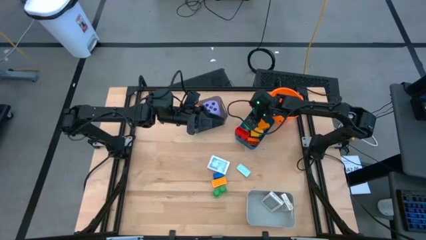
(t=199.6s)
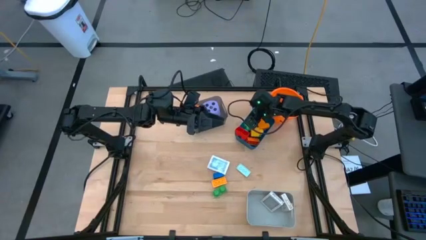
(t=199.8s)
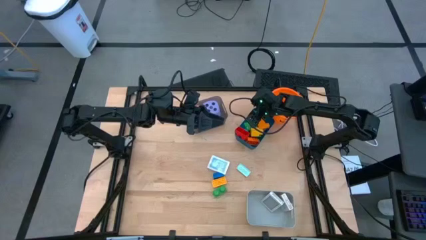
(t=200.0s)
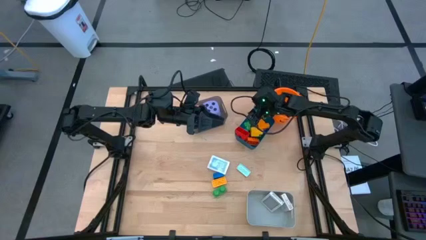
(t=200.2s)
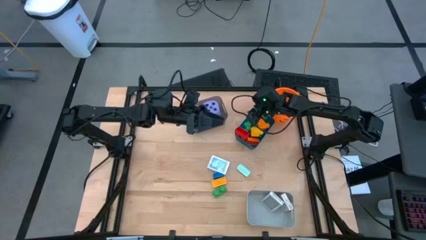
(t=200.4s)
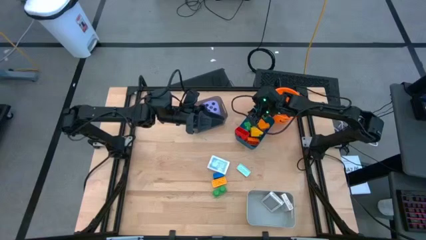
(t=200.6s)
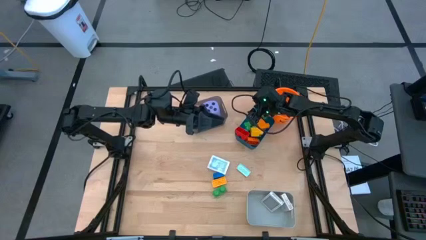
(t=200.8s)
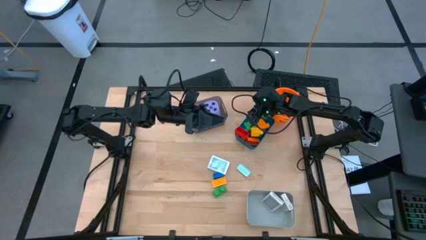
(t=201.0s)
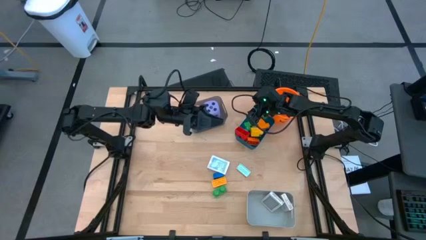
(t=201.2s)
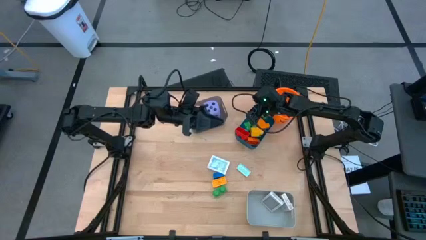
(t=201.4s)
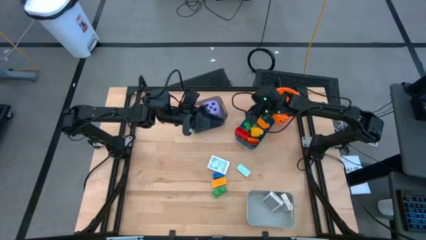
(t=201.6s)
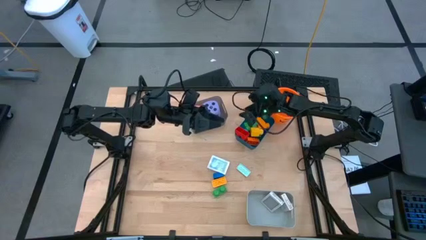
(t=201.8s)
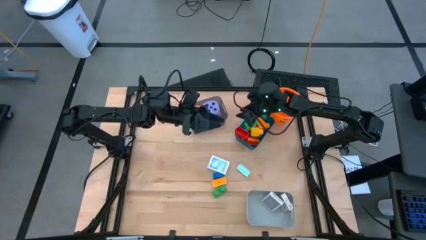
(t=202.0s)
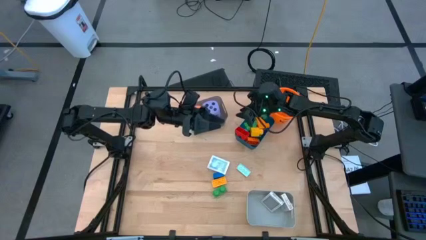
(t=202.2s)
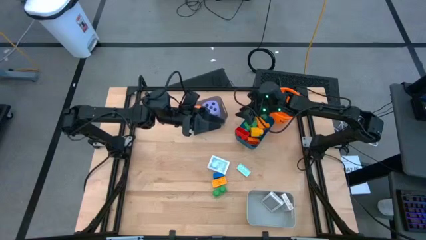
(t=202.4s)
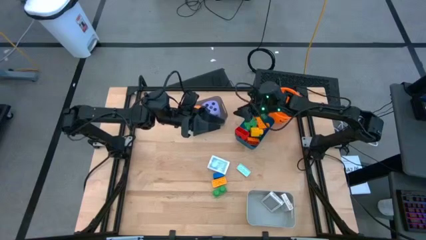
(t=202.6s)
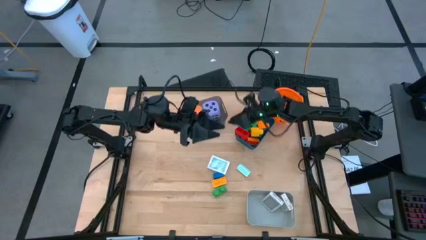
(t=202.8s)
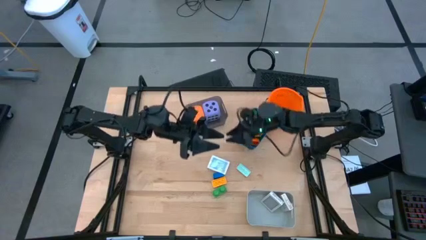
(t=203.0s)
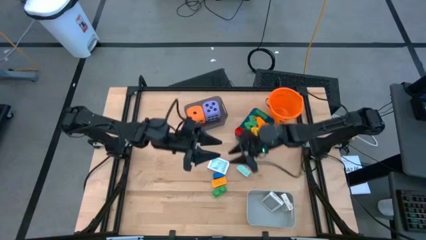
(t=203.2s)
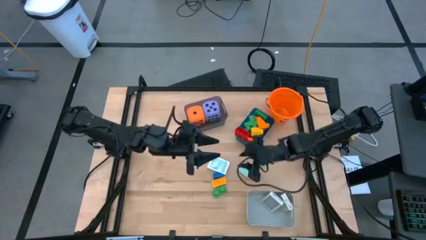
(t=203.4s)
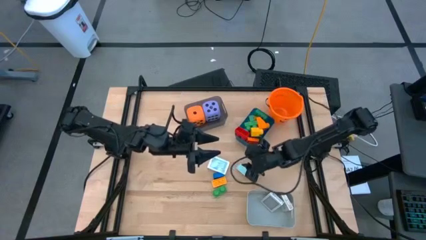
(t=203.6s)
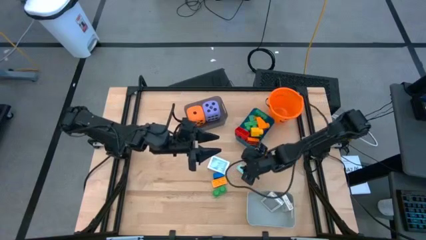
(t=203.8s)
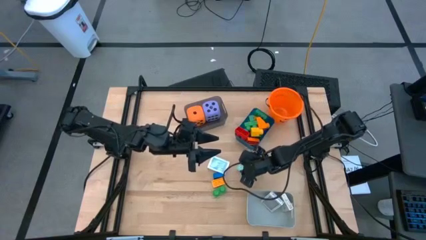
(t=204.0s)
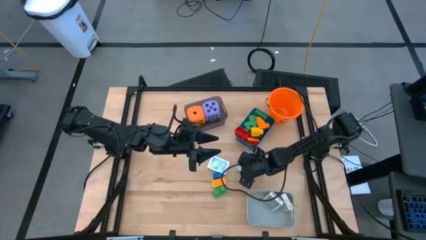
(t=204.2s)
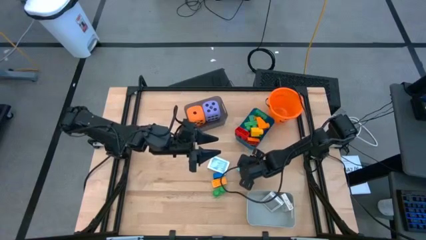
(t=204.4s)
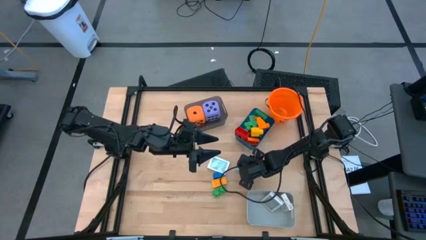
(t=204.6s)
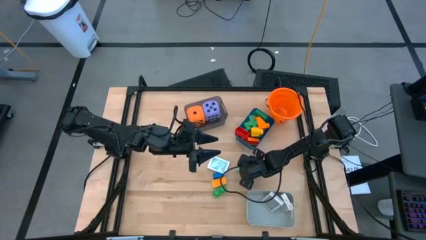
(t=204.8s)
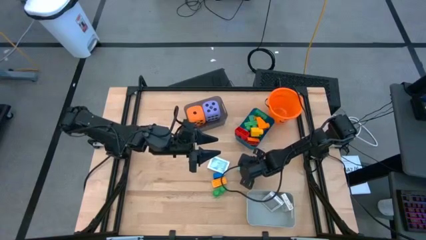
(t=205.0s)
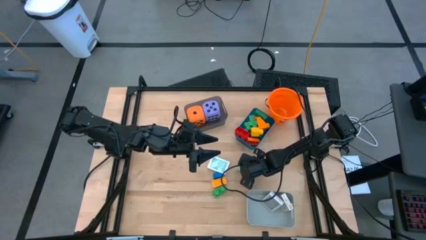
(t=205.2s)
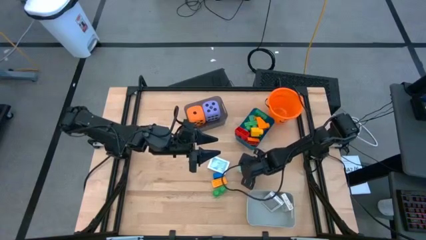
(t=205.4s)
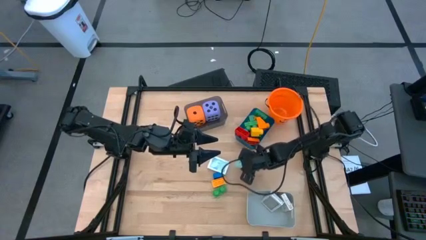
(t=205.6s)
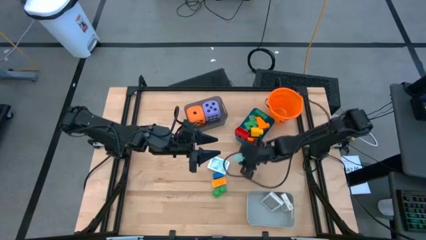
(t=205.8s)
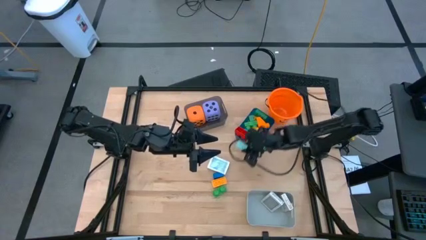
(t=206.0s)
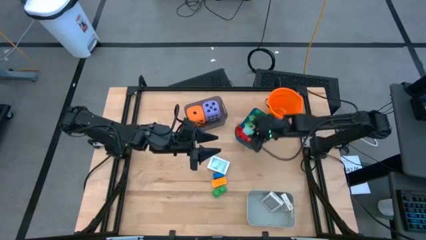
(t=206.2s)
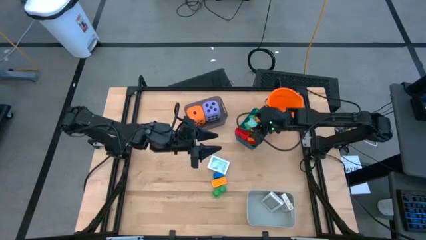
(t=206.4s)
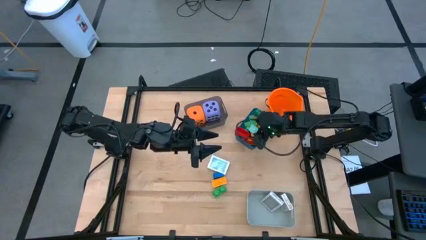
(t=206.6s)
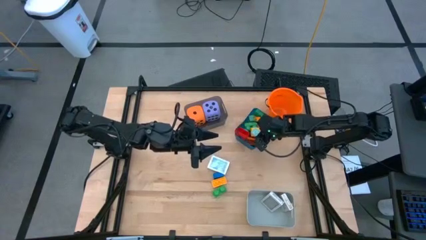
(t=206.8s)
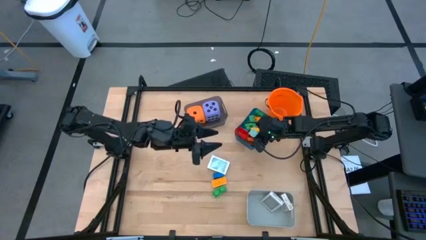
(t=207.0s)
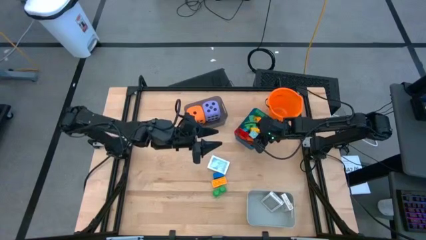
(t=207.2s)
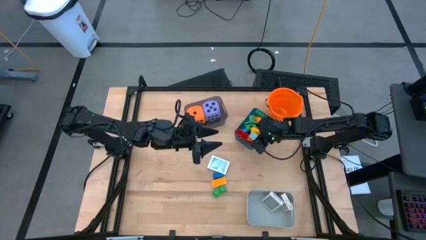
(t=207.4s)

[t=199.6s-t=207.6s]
Task: Pick & Place Toys
Put the white game piece into the blue bin

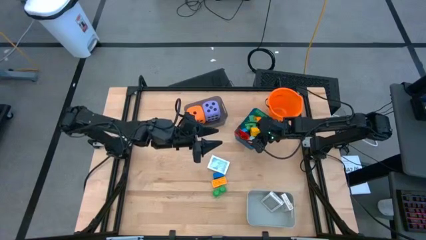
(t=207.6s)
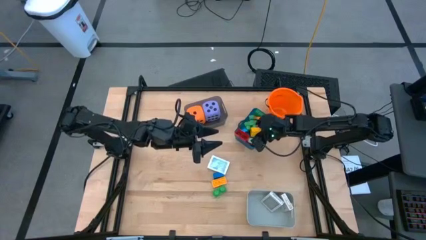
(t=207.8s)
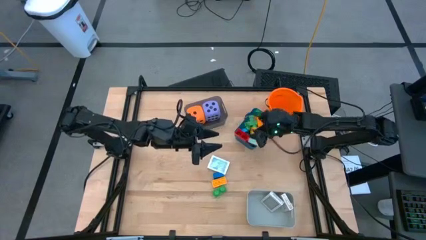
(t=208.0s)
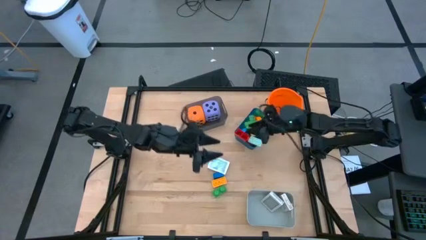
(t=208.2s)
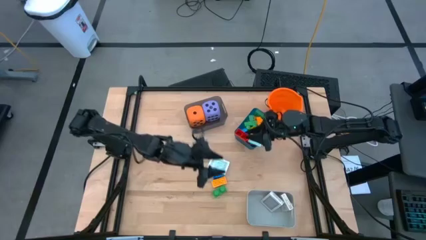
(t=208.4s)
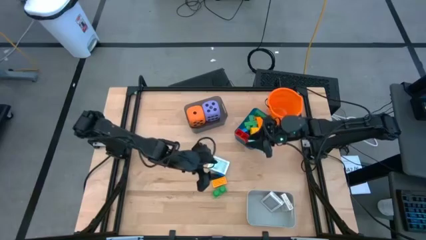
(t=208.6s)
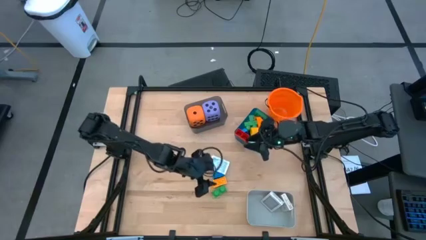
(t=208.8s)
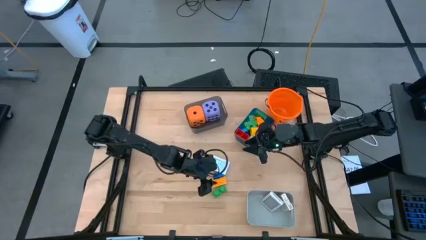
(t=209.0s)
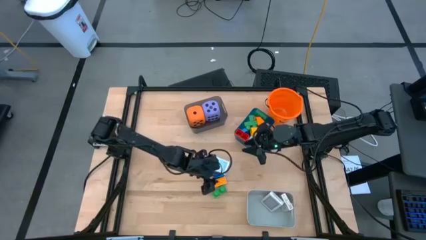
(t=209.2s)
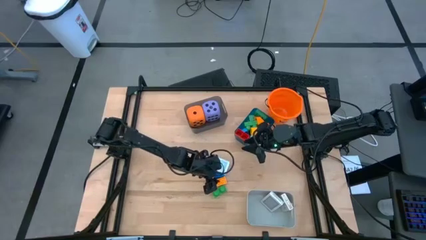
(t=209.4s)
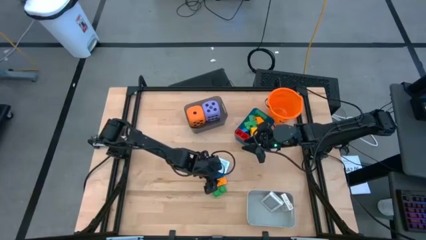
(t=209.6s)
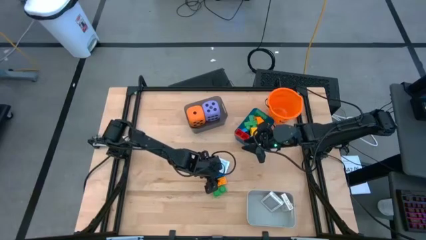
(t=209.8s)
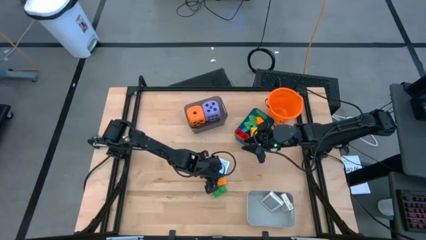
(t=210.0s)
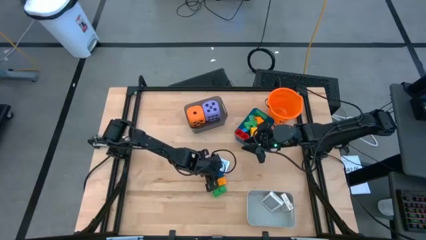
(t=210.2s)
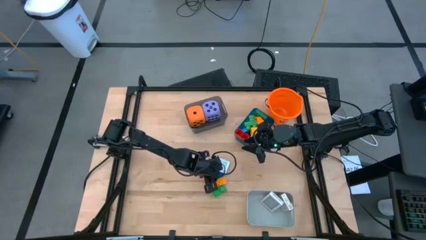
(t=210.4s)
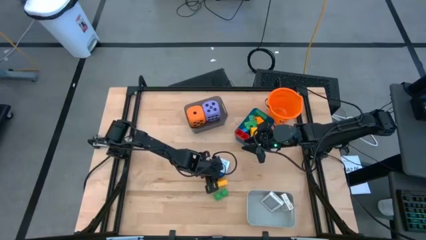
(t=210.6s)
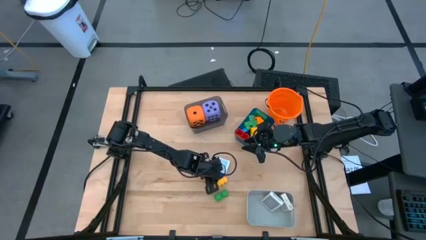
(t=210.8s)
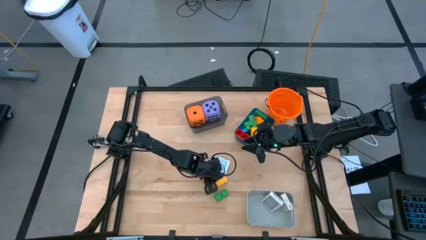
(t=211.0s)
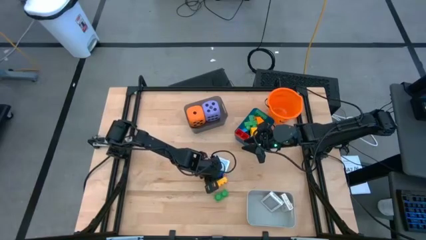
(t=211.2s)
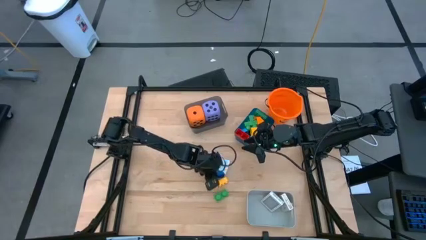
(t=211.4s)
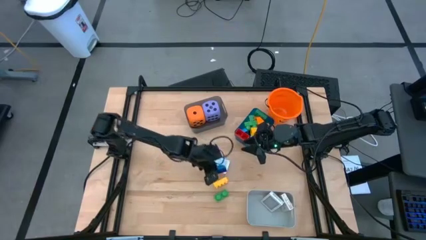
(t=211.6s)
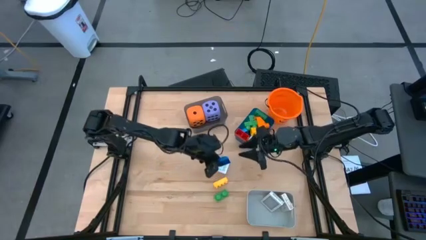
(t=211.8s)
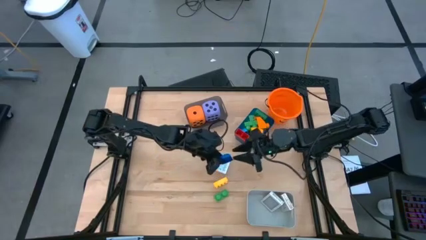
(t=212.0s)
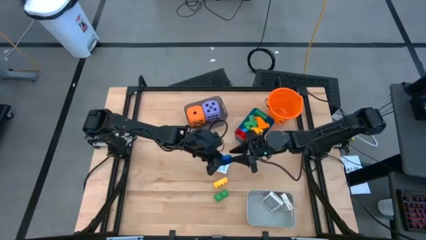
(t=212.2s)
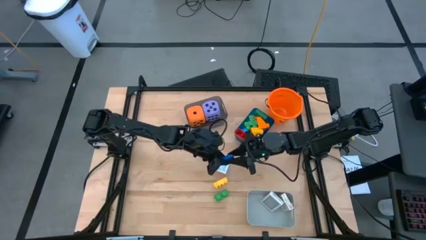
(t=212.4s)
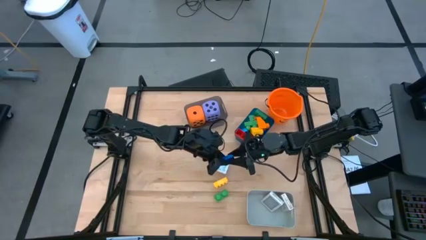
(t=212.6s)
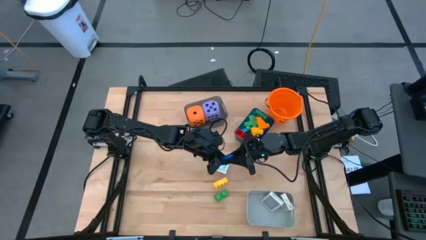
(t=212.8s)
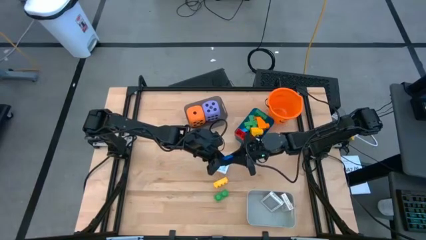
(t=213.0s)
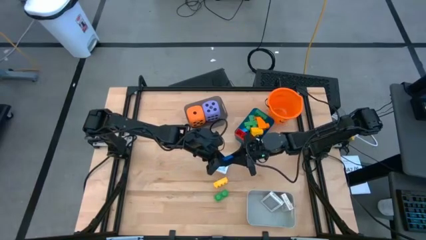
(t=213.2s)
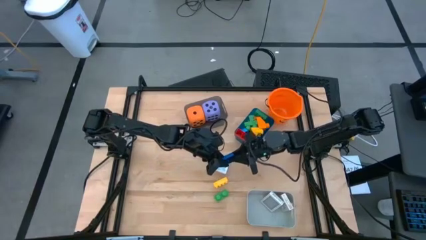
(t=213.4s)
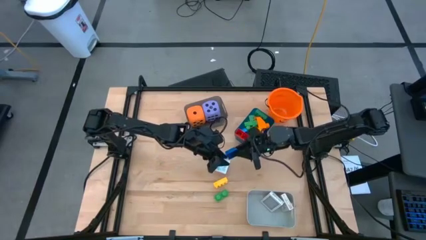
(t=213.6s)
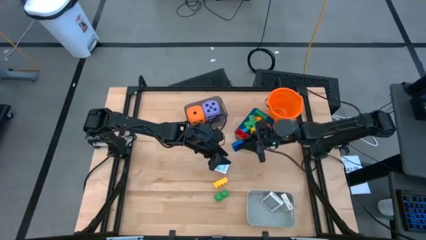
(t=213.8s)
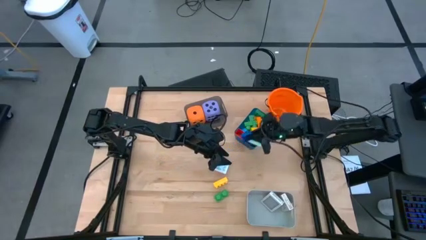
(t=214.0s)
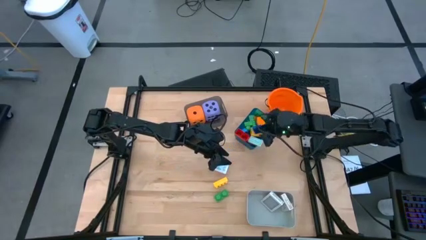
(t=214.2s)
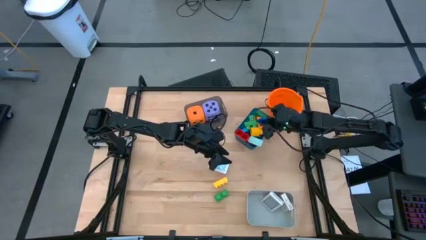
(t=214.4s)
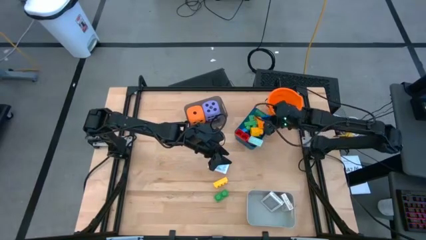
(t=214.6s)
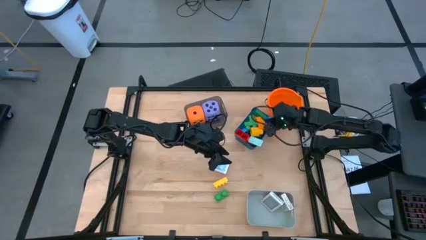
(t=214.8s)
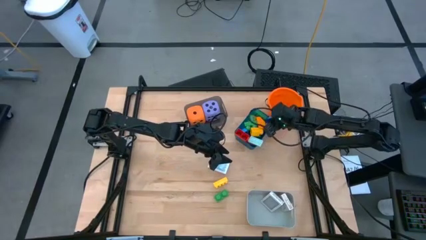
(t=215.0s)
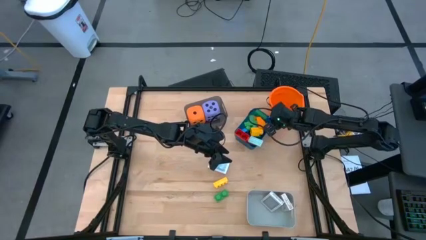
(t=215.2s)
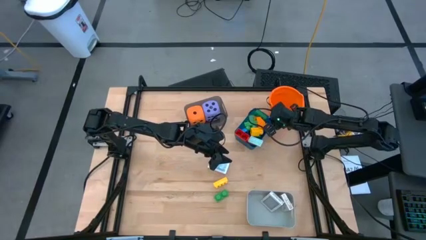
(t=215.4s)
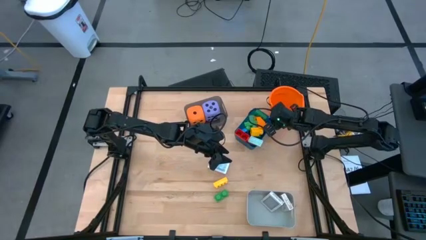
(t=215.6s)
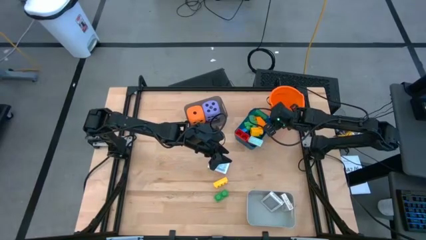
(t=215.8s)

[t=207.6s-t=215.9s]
Put the blue game piece into the blue bin
